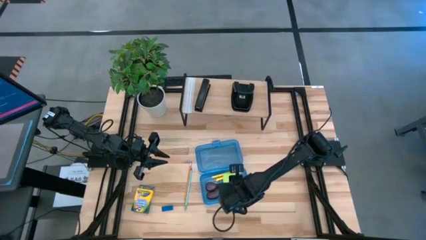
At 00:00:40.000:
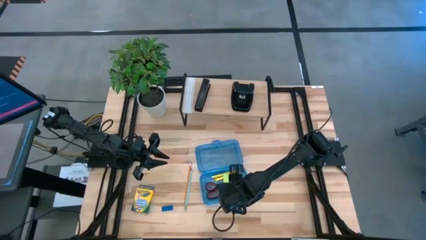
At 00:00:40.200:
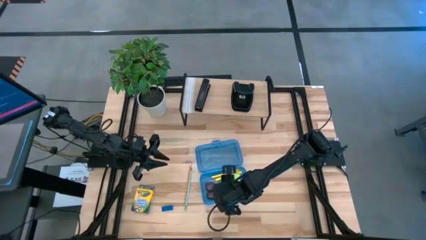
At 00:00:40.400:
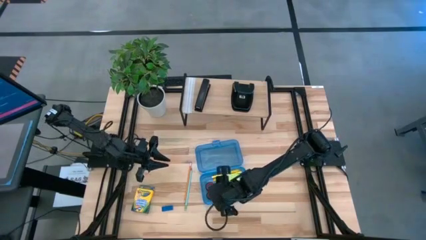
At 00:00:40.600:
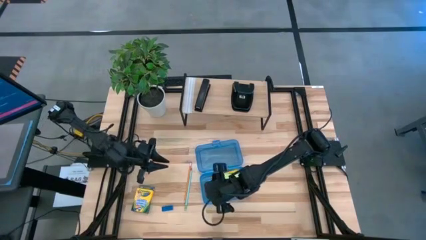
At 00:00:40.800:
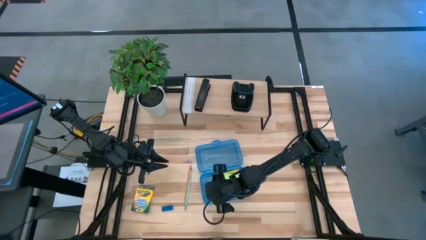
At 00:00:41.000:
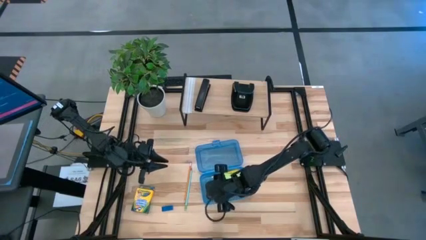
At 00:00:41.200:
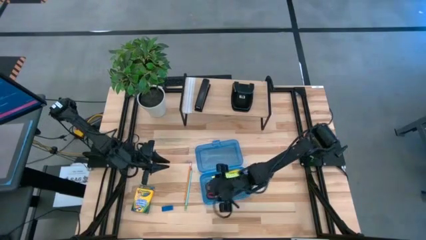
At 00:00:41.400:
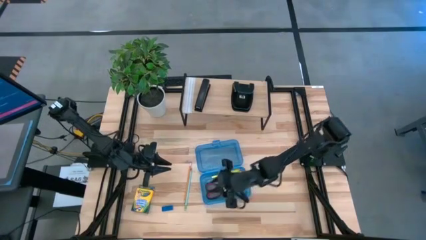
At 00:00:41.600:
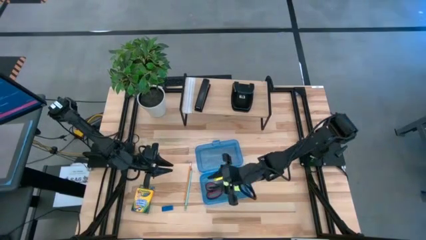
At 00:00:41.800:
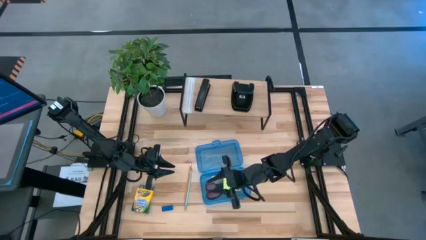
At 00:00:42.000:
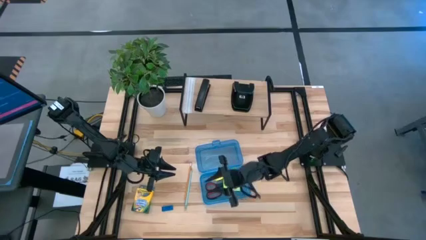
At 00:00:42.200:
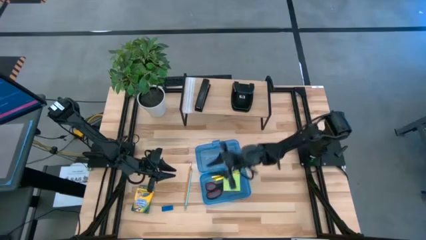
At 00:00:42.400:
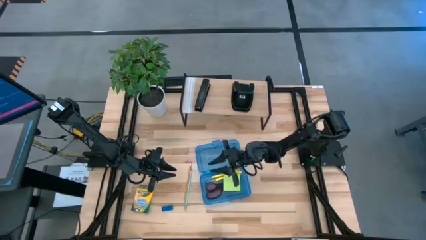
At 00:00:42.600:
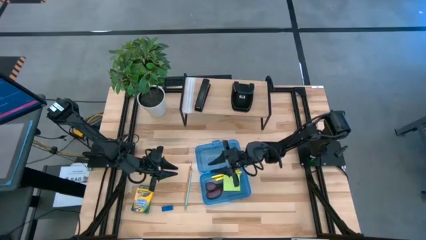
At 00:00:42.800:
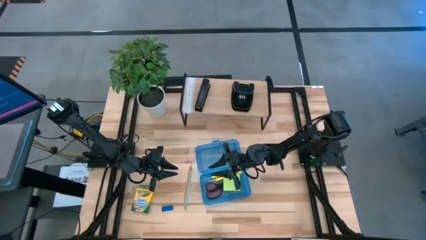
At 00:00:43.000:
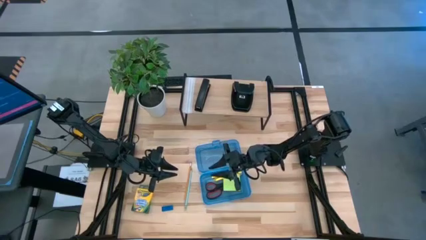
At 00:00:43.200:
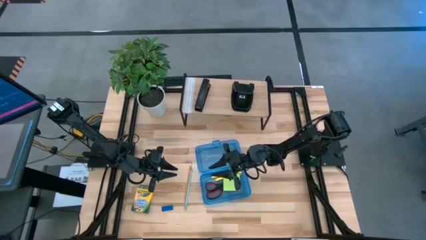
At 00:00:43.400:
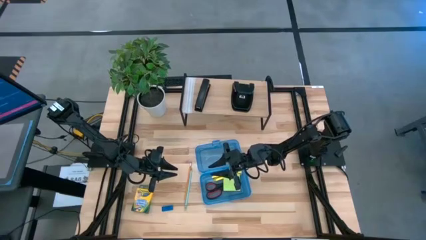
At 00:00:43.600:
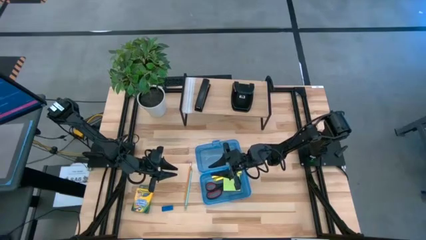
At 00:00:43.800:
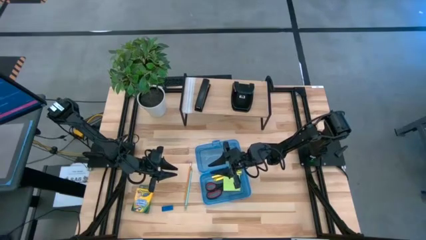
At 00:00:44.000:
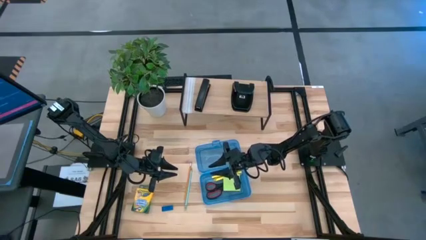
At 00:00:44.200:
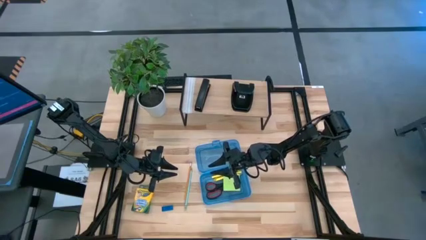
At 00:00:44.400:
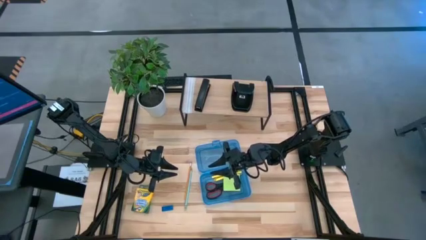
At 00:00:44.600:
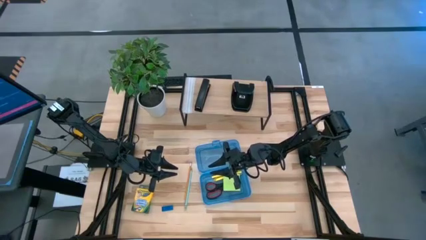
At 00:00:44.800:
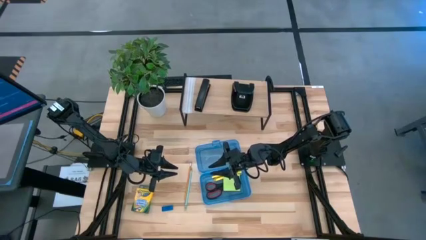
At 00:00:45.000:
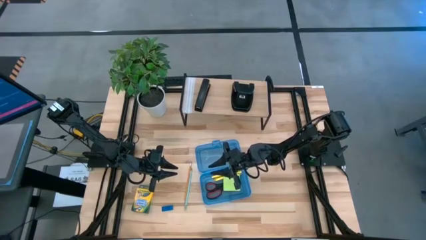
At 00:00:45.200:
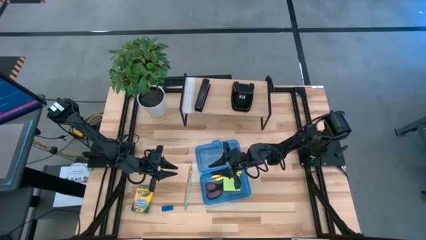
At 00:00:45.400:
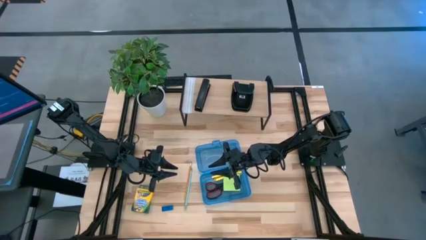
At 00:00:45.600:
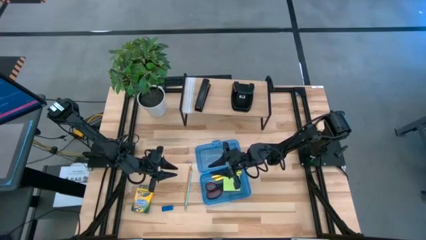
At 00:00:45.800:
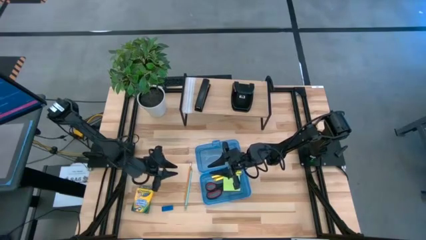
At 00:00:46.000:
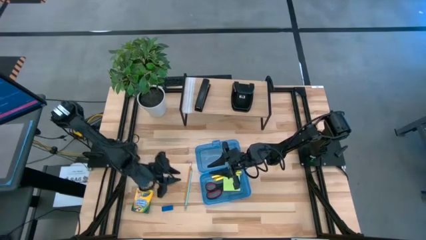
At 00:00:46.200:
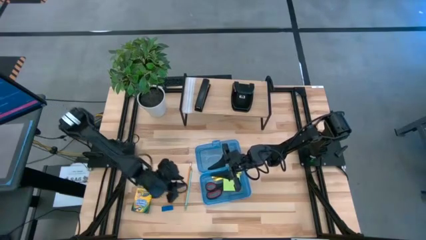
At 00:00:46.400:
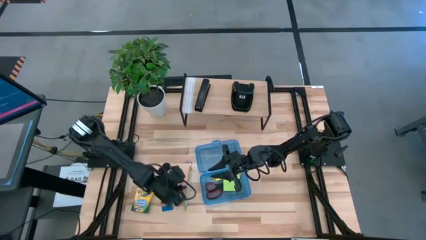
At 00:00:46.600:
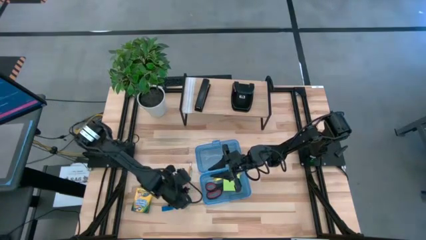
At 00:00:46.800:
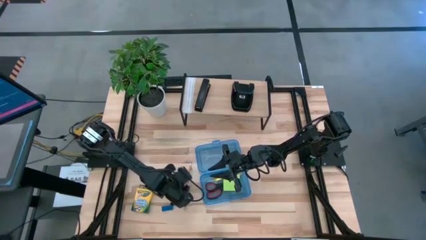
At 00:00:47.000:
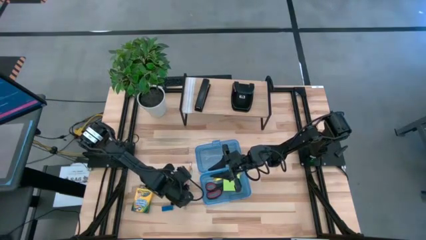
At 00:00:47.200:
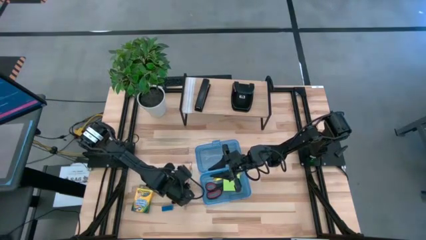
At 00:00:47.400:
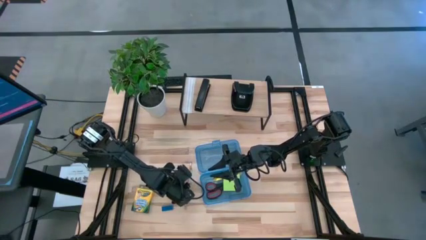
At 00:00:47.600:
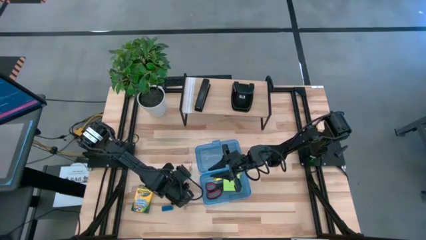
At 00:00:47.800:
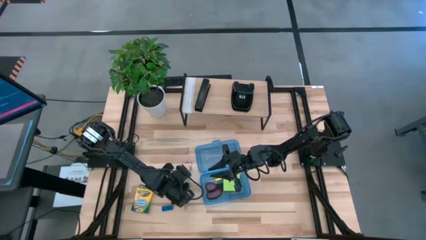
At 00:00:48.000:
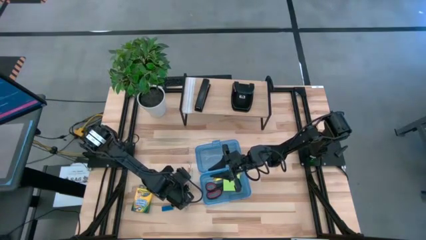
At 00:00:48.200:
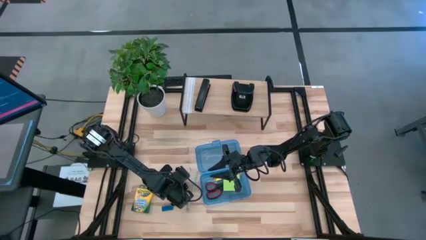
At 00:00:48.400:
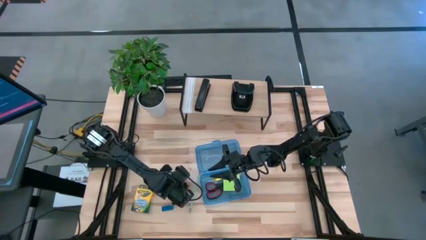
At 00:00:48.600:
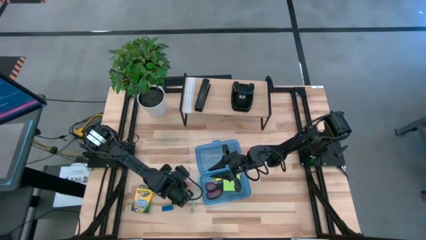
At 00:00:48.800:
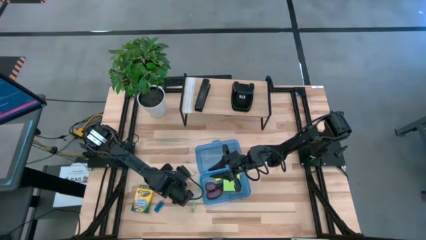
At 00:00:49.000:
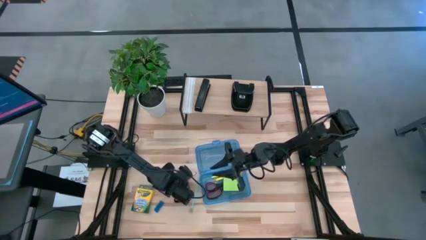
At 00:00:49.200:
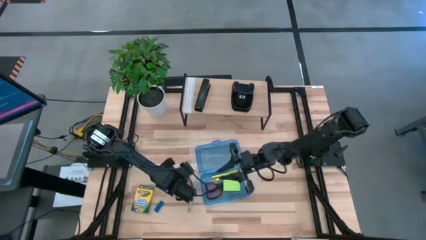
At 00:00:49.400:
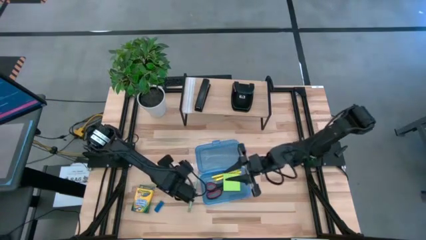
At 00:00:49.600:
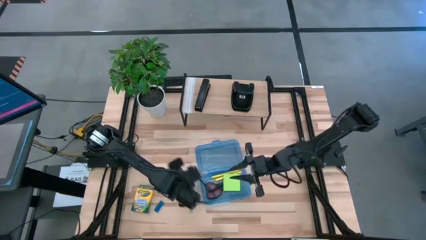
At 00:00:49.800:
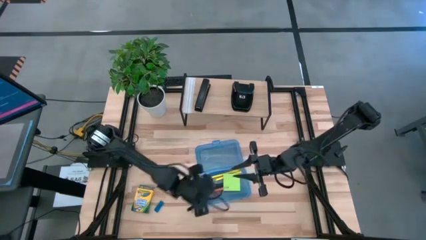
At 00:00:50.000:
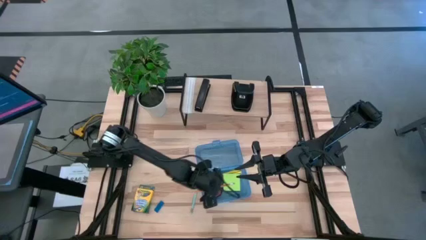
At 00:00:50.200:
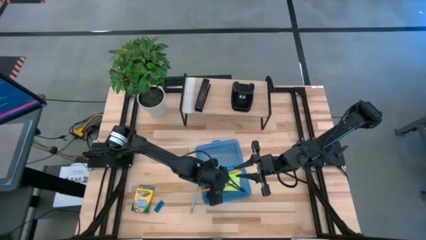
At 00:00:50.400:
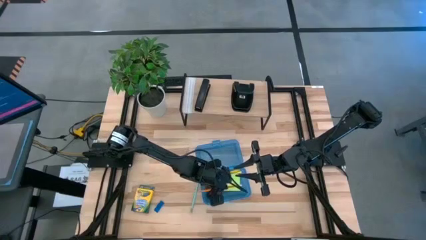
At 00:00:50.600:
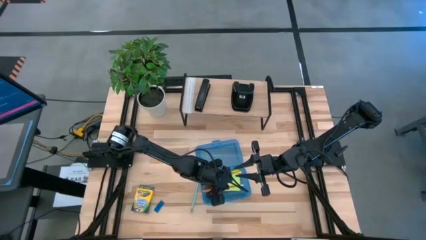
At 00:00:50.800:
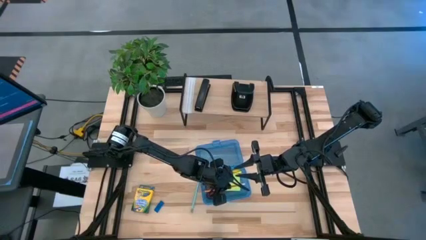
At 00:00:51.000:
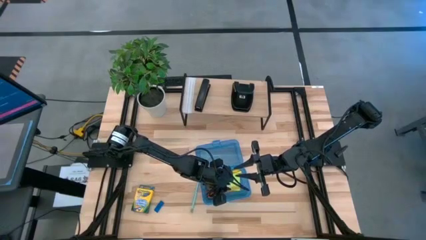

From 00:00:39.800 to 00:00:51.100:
Task: Pack school essentials
Put the yellow pencil into the blue supply box

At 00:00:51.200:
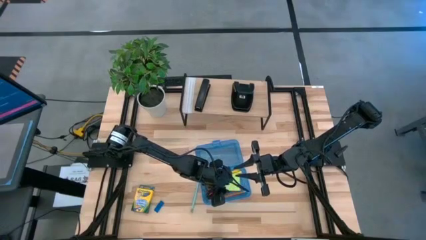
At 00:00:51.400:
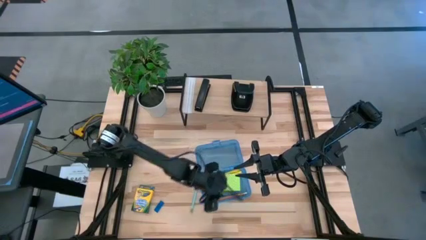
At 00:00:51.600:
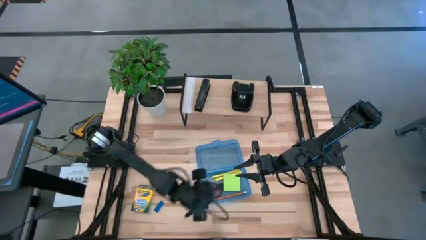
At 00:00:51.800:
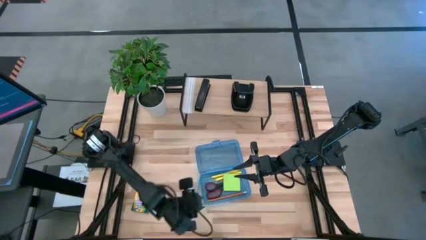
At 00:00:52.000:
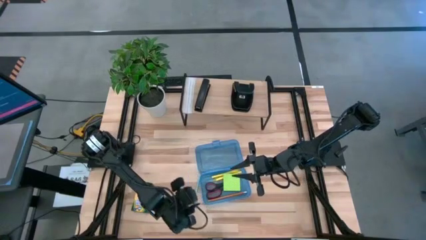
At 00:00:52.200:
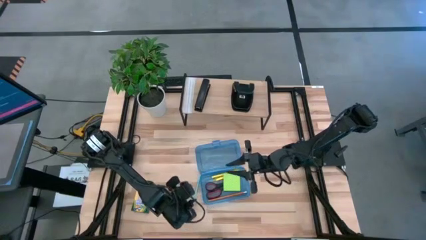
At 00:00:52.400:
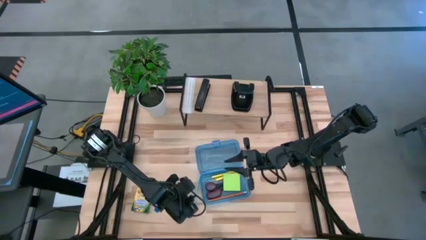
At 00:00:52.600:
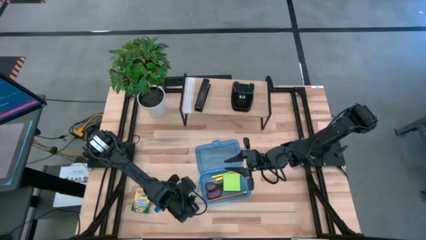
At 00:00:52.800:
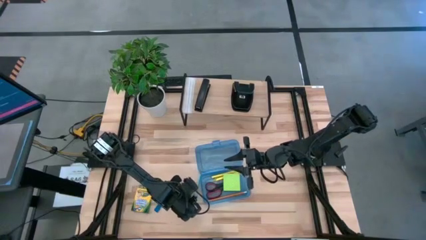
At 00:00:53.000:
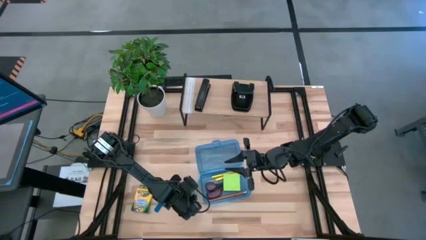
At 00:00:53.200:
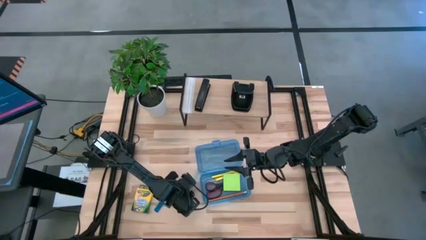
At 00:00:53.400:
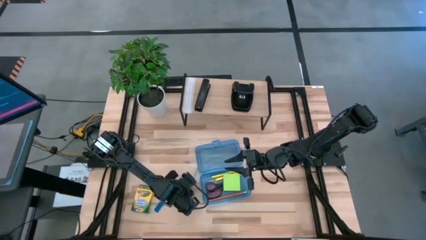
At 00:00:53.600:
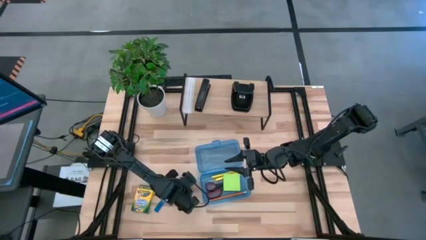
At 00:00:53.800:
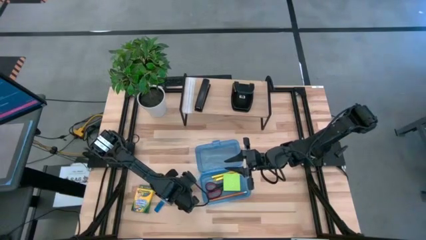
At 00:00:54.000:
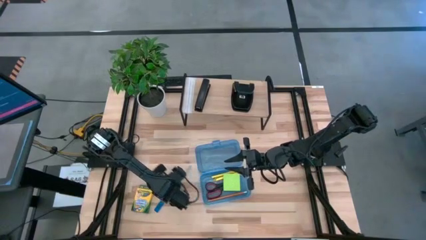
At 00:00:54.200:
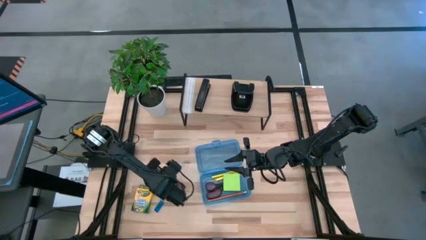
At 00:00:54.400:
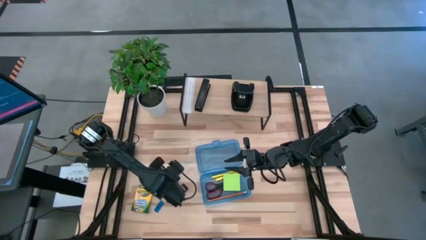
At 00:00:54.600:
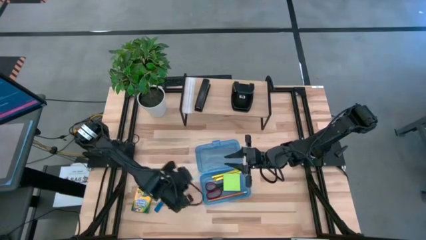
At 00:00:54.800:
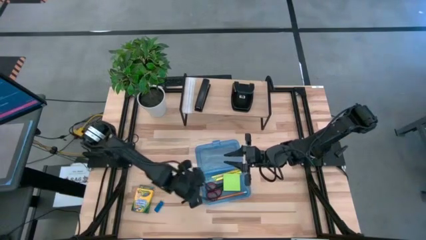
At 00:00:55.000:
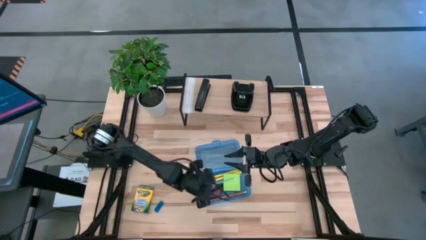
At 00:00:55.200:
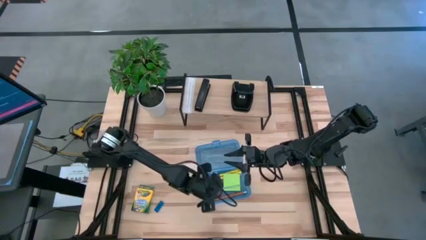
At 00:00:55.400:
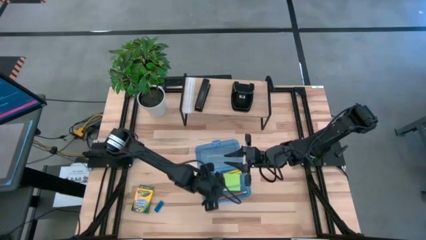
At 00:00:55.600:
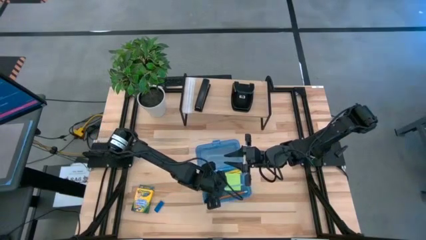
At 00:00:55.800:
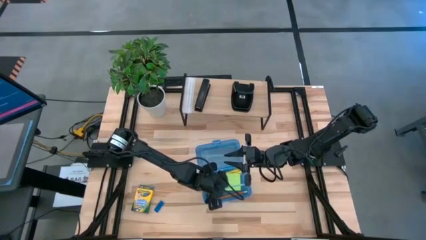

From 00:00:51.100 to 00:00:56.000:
Put the light blue pencil into the blue supply box
